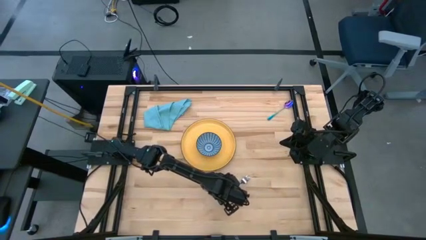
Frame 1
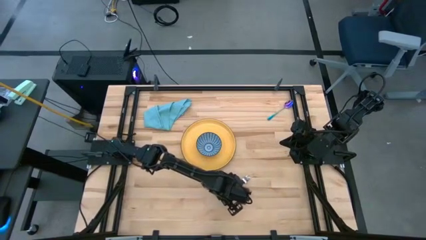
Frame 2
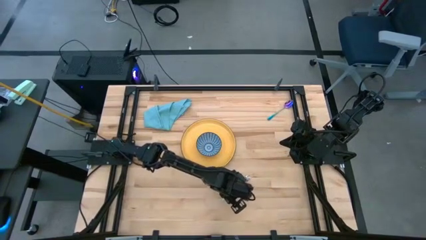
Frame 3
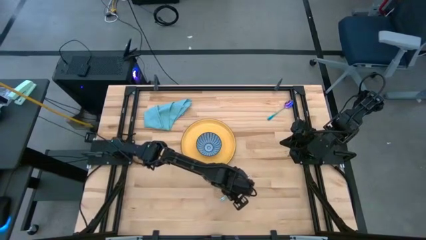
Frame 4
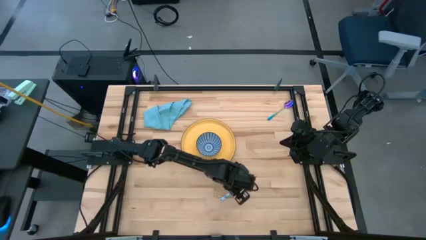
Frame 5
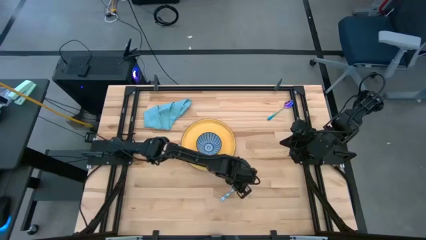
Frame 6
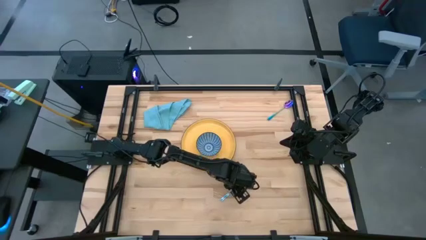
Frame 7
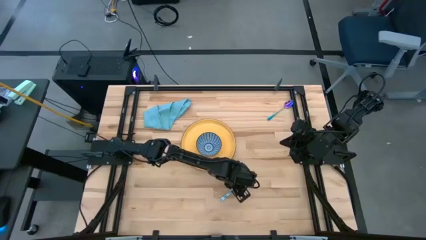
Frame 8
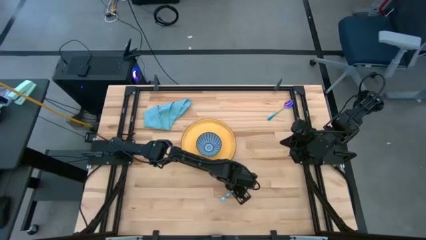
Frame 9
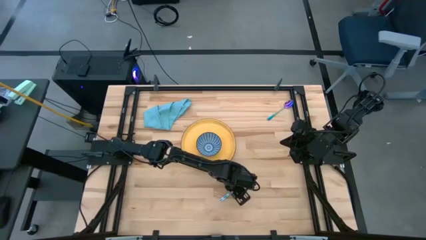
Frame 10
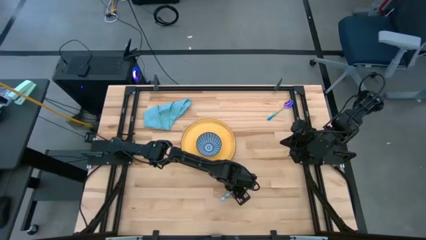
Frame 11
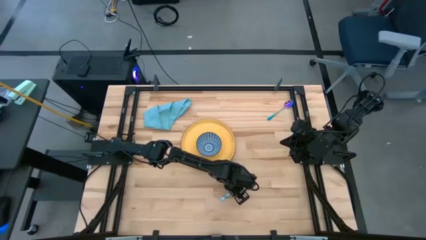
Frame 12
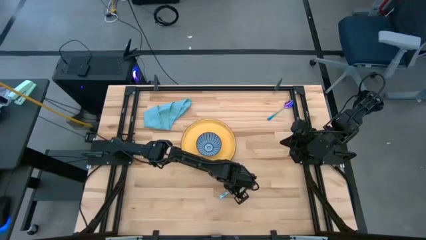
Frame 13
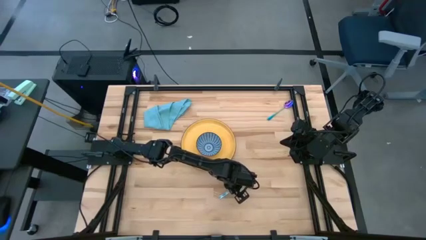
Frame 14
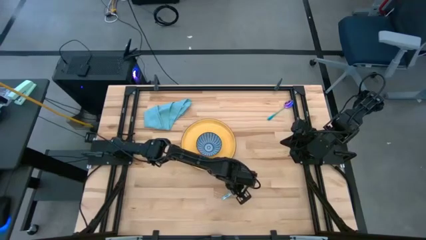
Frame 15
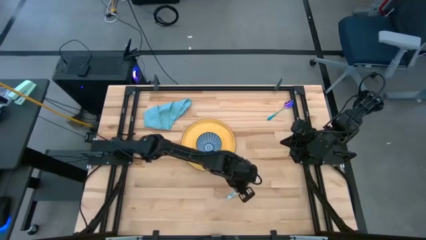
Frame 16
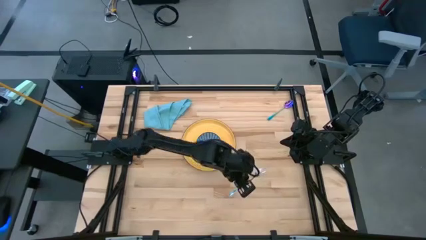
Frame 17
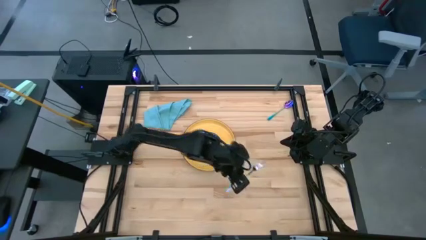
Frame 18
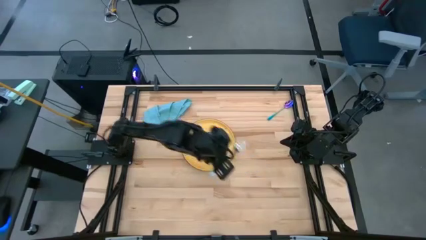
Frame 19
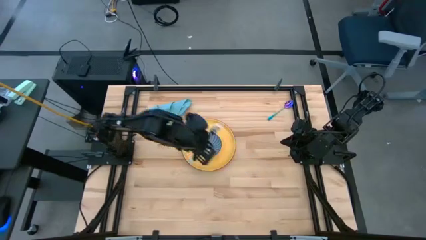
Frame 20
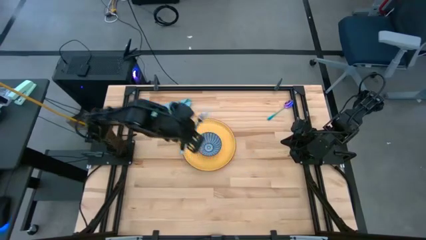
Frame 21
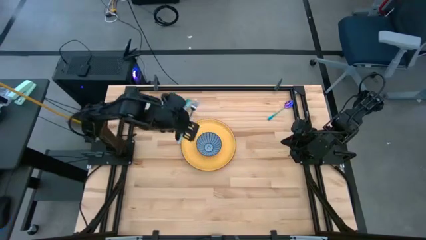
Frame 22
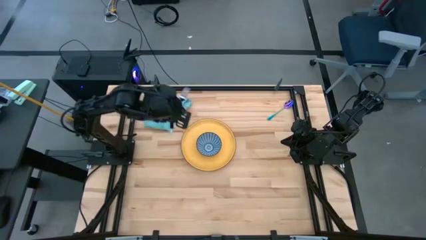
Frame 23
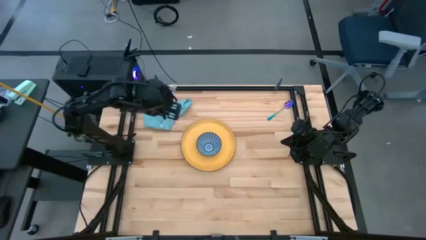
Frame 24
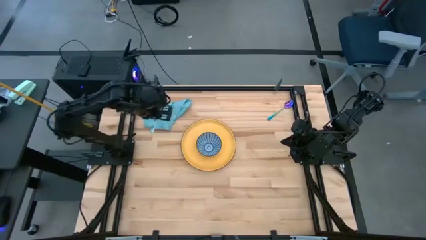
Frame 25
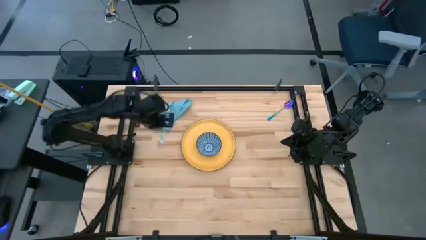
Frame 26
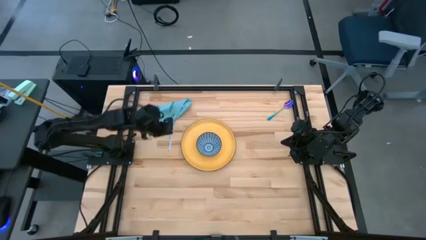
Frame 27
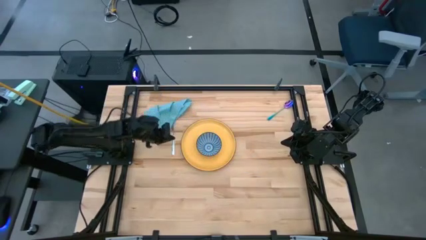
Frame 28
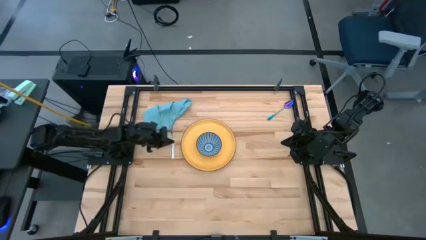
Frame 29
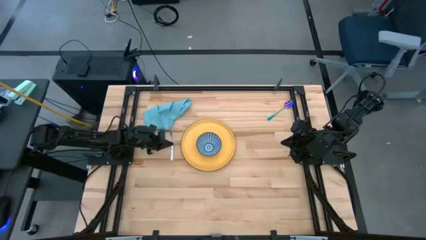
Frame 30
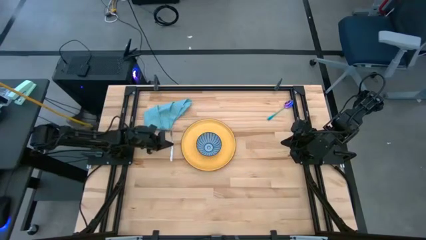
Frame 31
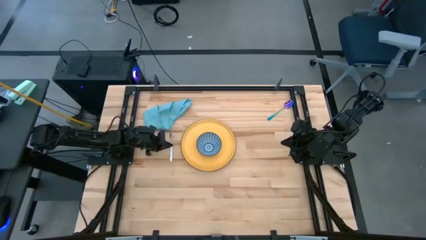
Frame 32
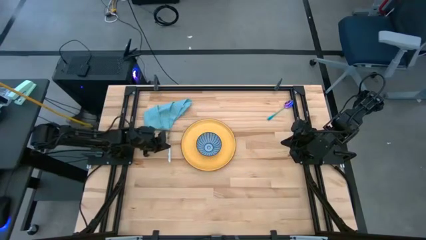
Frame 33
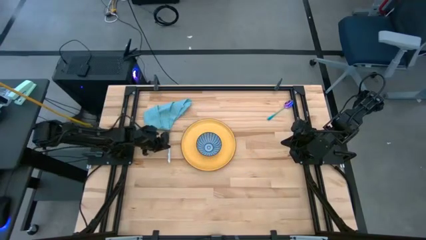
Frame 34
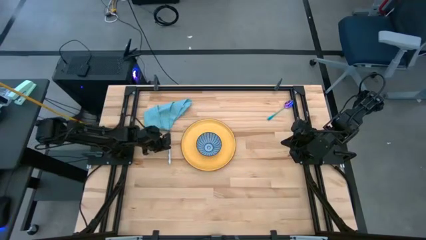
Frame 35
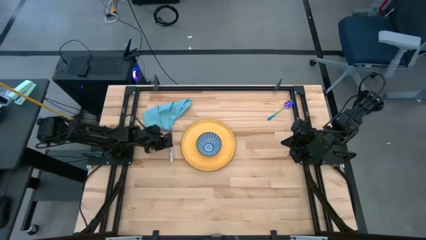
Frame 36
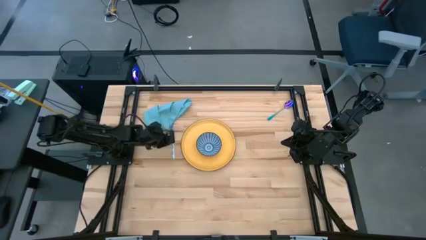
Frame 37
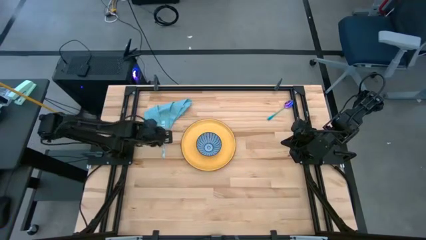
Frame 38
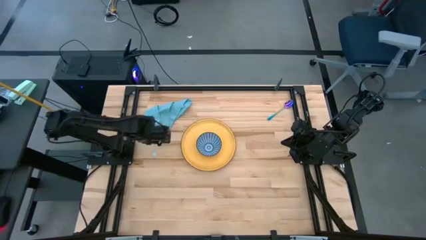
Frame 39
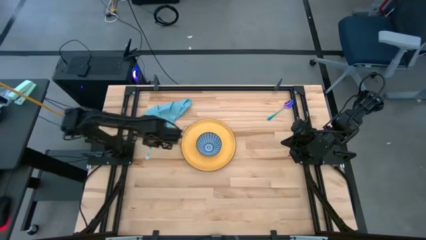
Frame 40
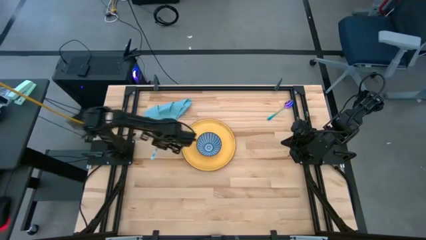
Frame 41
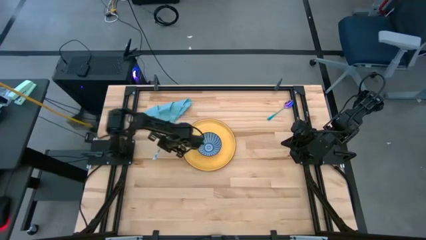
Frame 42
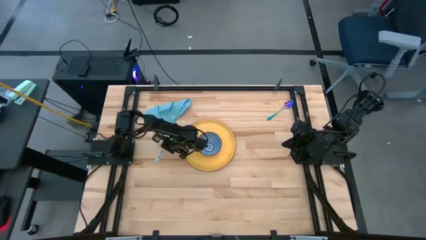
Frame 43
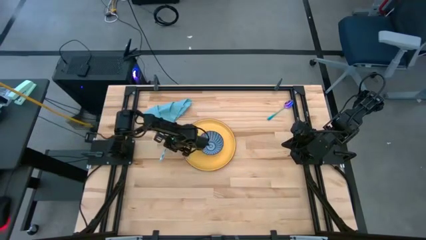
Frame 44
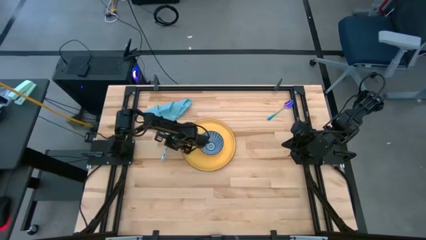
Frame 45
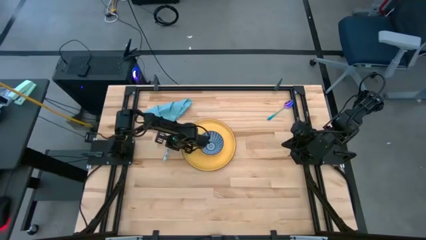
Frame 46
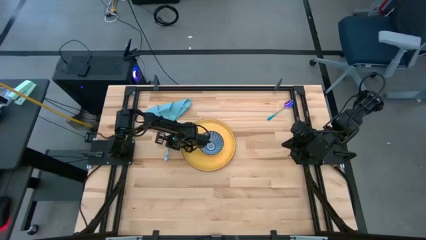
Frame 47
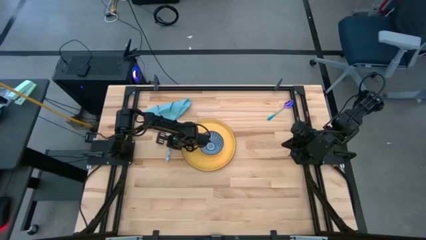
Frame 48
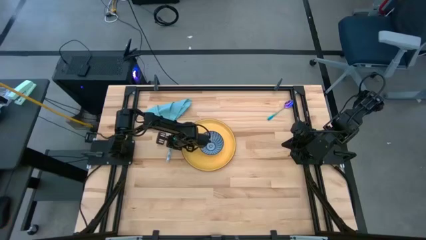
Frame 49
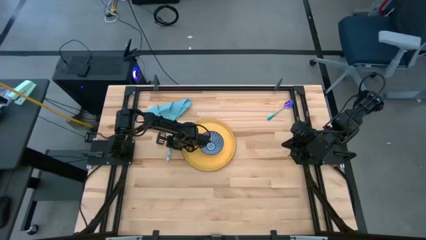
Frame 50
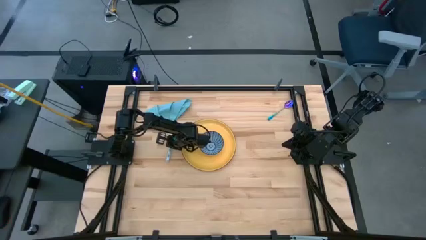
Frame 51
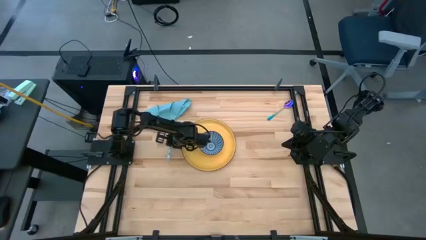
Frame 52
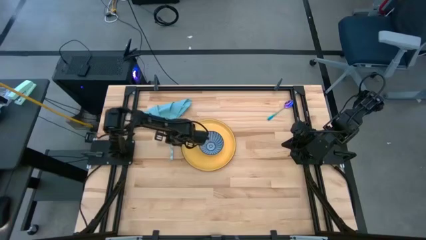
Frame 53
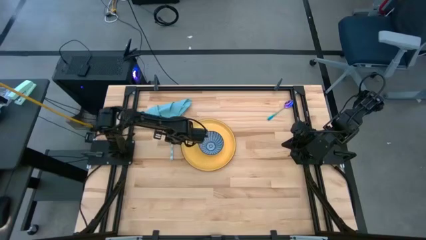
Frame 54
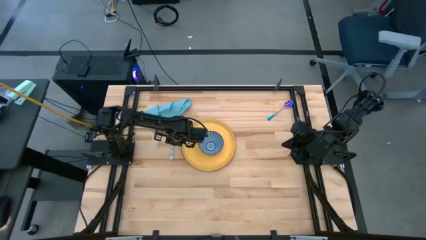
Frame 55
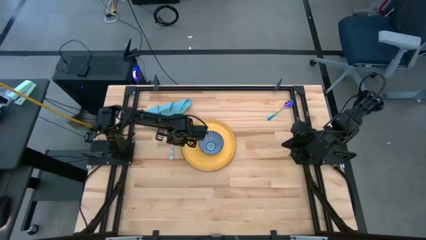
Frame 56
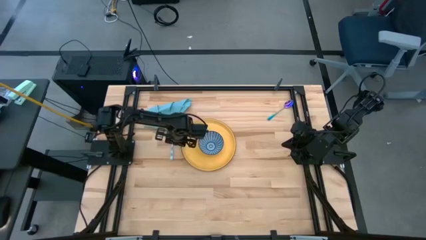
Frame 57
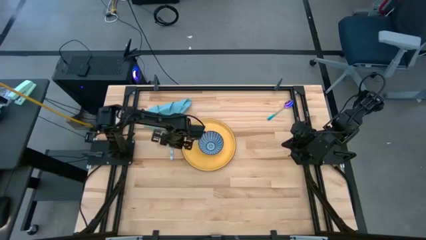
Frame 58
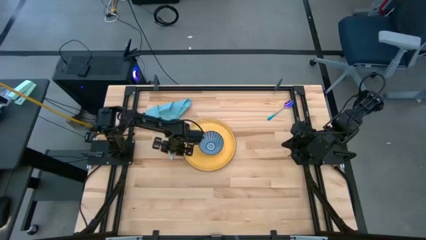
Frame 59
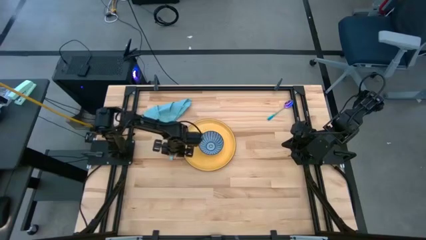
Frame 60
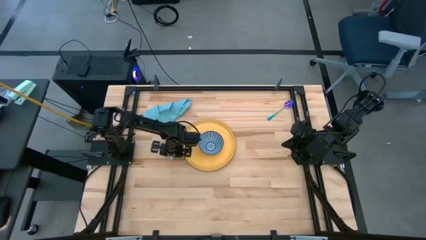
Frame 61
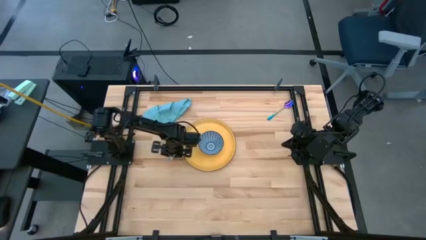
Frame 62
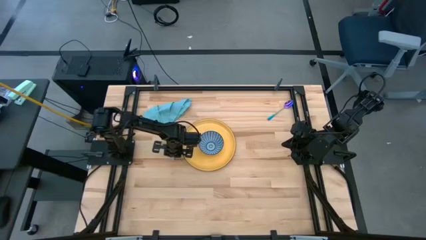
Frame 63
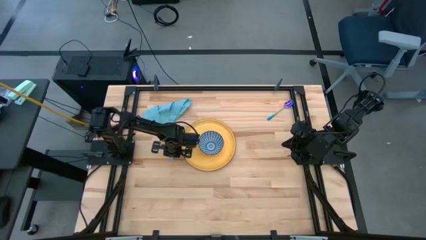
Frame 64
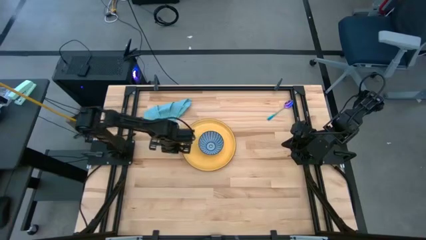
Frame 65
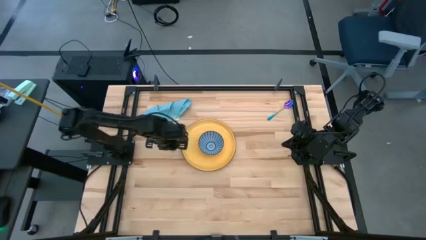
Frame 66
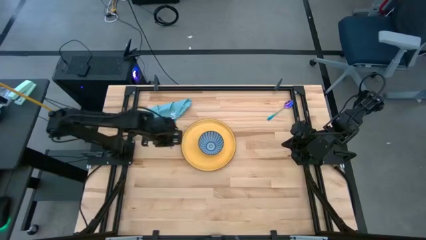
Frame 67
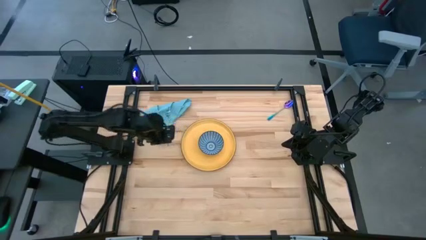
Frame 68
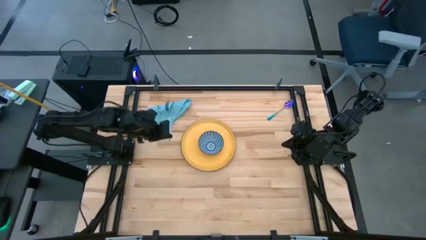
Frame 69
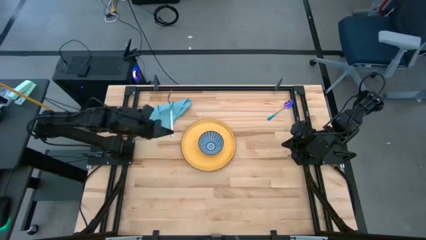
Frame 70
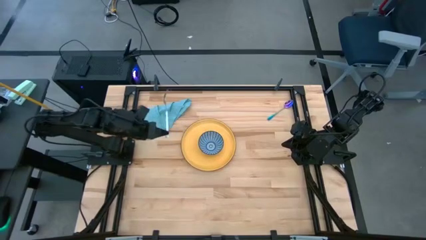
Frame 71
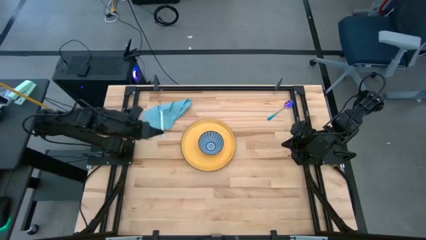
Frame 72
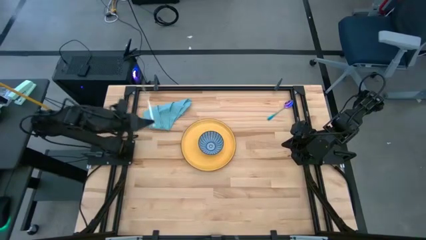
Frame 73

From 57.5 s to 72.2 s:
Task: Set table place
Put the blue fork to the left of the yellow plate
